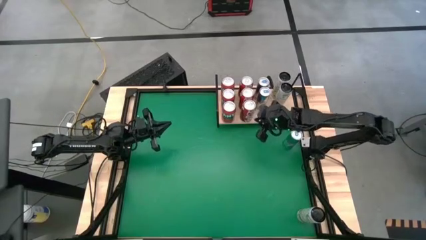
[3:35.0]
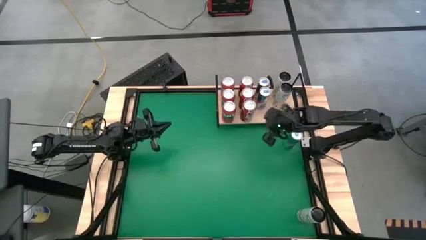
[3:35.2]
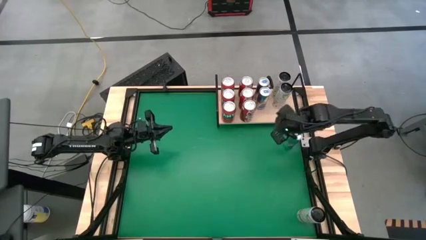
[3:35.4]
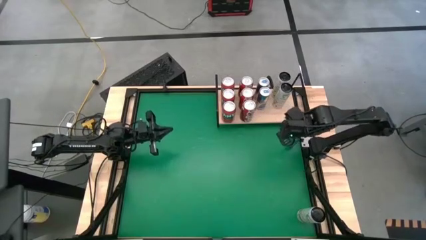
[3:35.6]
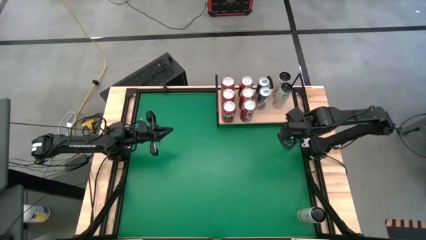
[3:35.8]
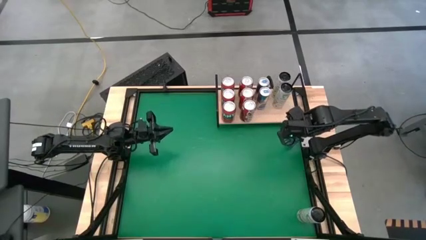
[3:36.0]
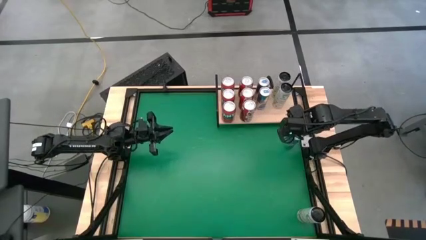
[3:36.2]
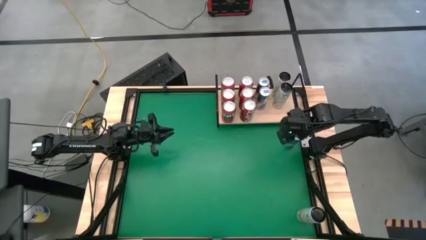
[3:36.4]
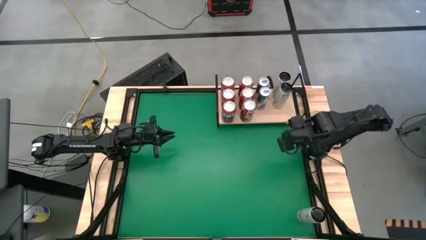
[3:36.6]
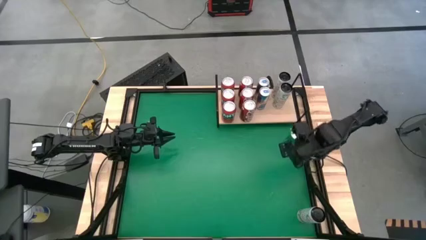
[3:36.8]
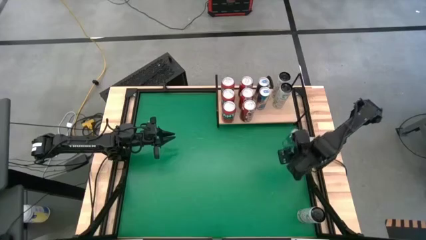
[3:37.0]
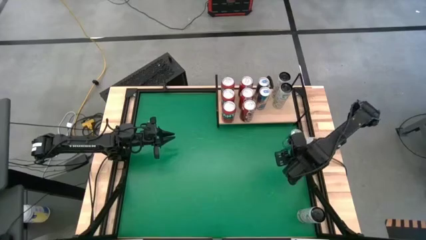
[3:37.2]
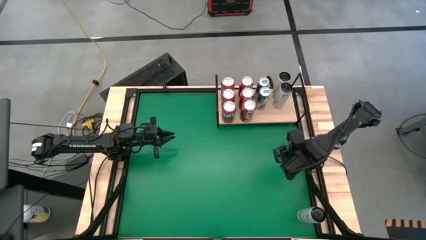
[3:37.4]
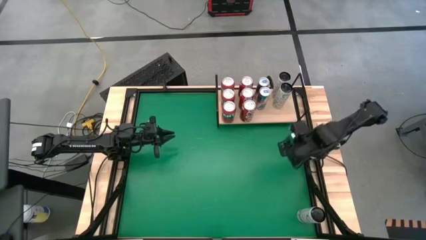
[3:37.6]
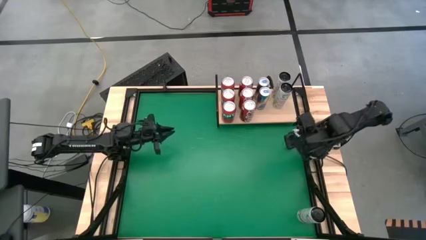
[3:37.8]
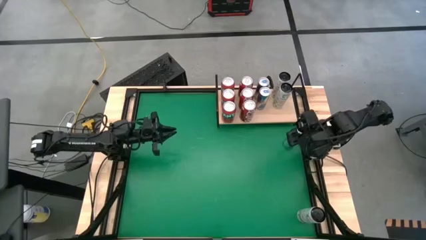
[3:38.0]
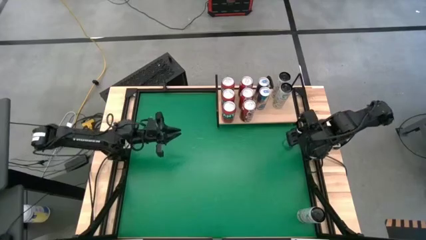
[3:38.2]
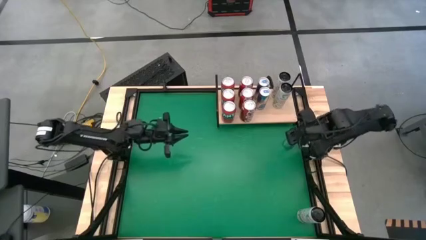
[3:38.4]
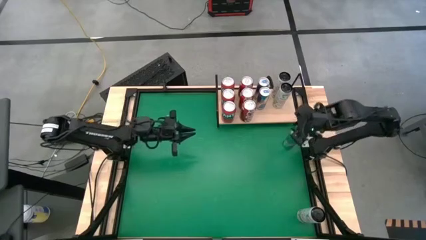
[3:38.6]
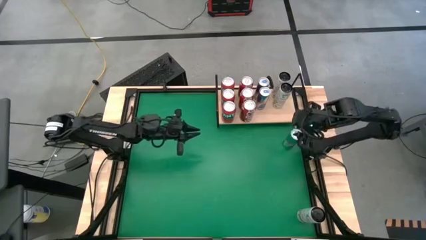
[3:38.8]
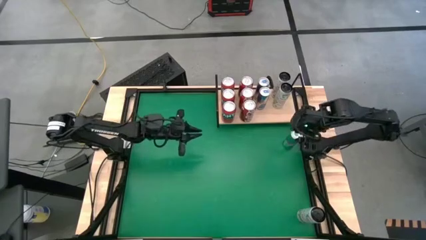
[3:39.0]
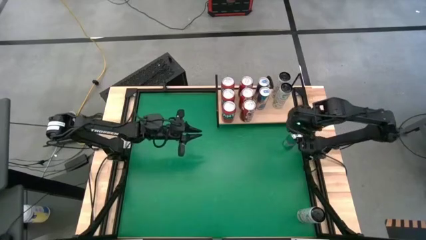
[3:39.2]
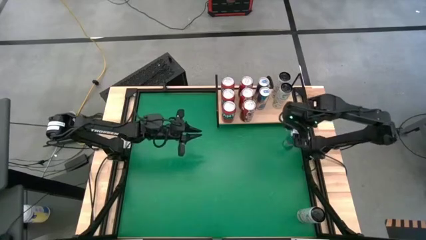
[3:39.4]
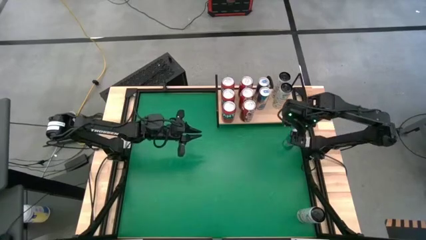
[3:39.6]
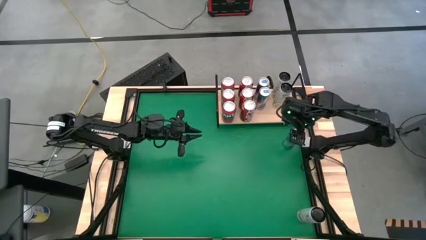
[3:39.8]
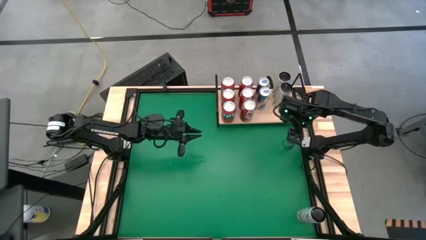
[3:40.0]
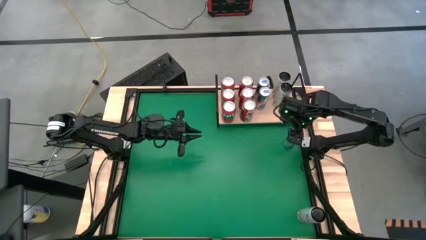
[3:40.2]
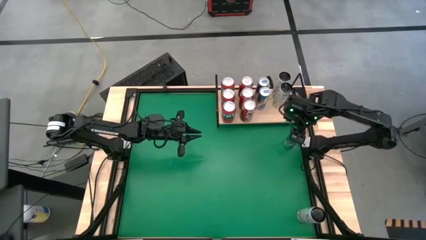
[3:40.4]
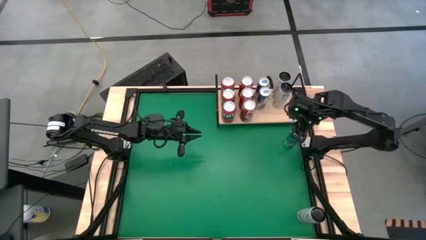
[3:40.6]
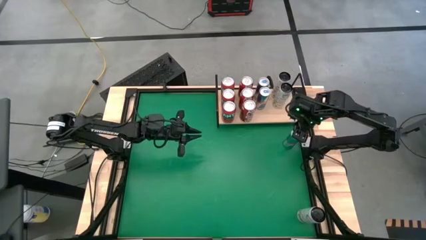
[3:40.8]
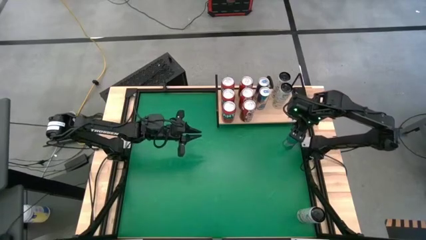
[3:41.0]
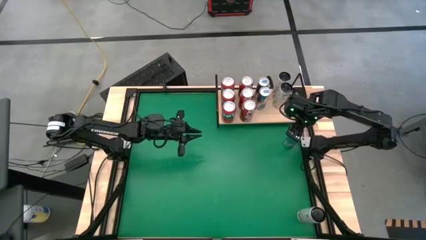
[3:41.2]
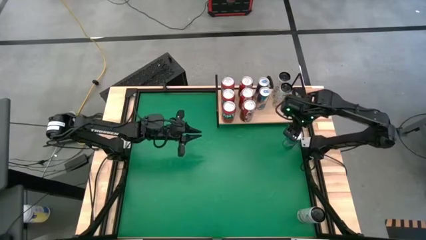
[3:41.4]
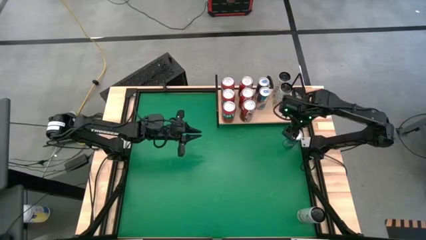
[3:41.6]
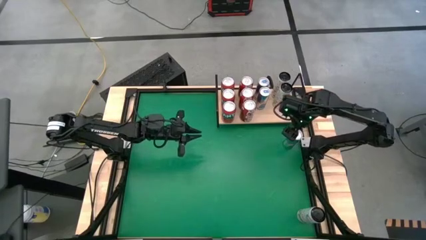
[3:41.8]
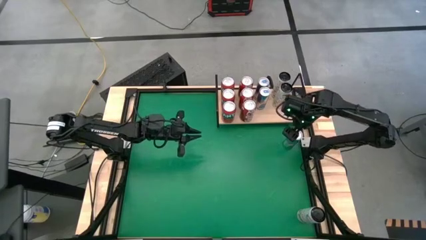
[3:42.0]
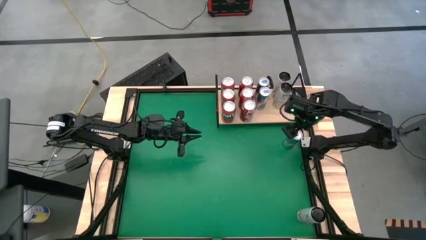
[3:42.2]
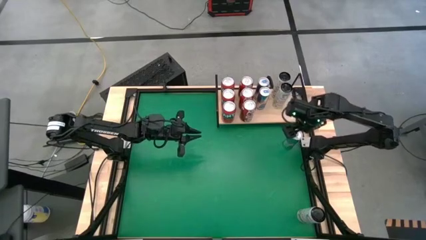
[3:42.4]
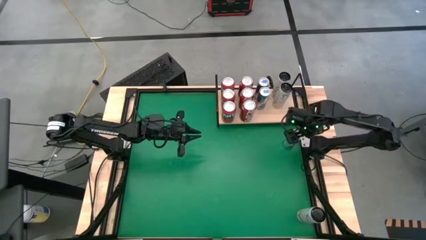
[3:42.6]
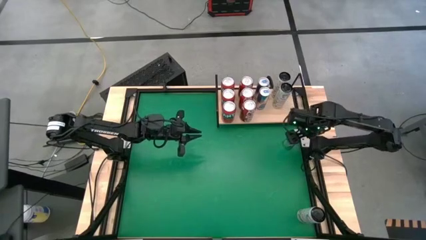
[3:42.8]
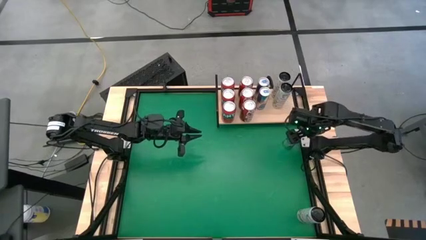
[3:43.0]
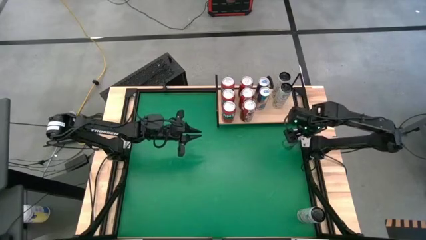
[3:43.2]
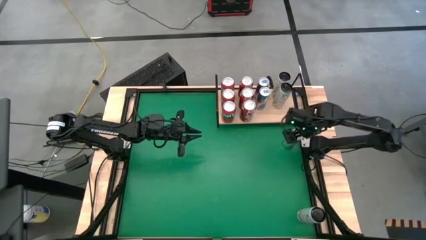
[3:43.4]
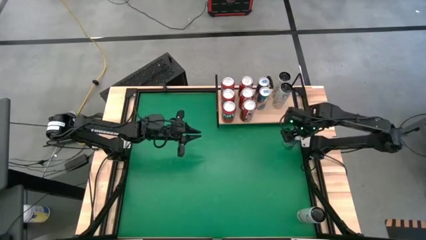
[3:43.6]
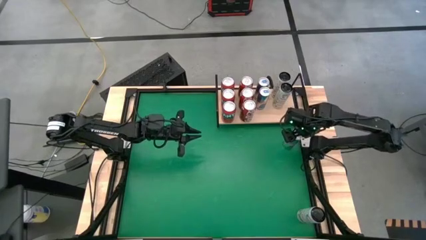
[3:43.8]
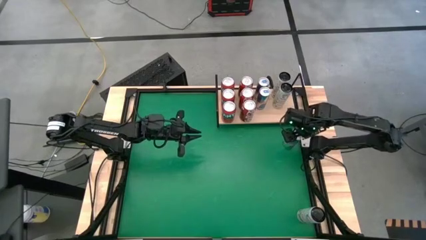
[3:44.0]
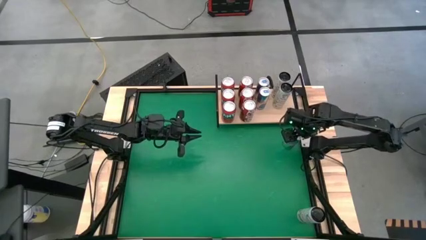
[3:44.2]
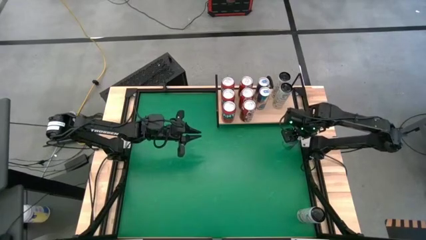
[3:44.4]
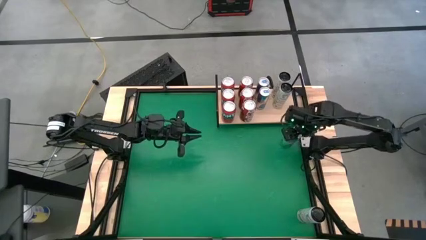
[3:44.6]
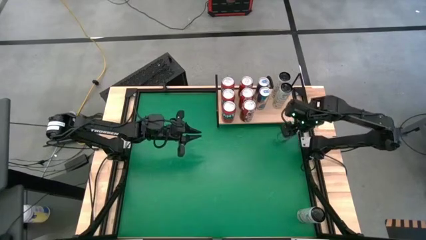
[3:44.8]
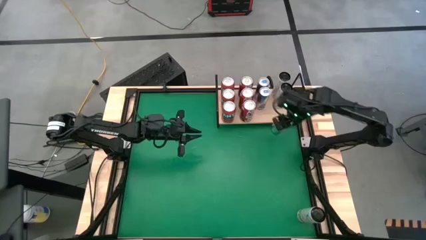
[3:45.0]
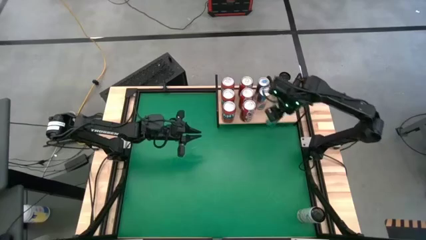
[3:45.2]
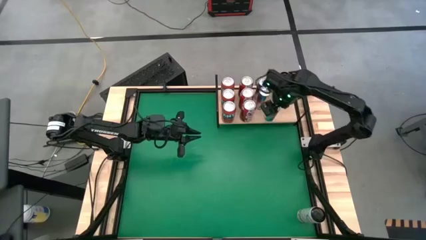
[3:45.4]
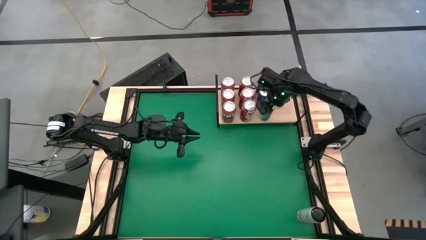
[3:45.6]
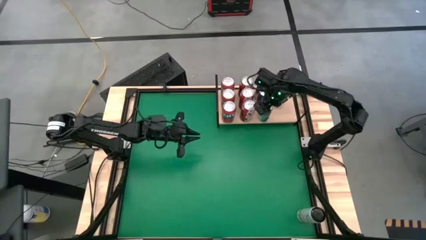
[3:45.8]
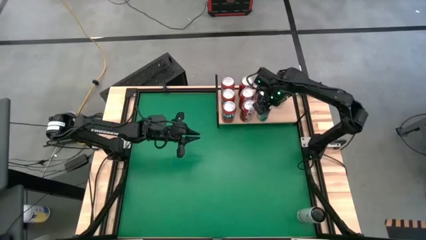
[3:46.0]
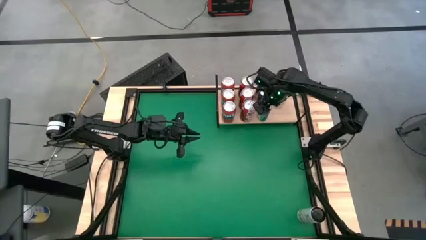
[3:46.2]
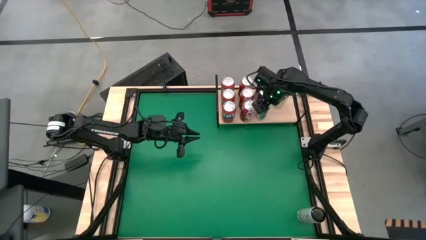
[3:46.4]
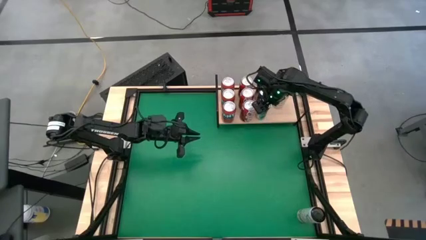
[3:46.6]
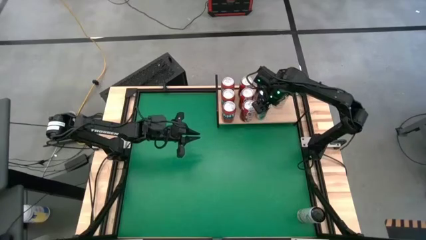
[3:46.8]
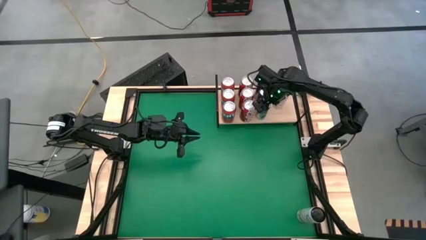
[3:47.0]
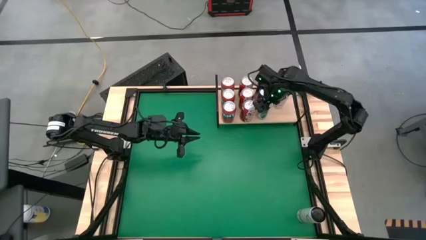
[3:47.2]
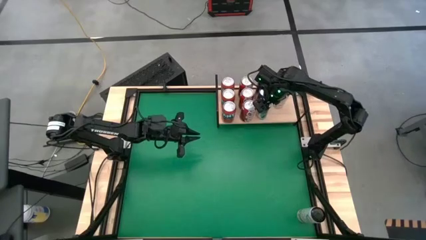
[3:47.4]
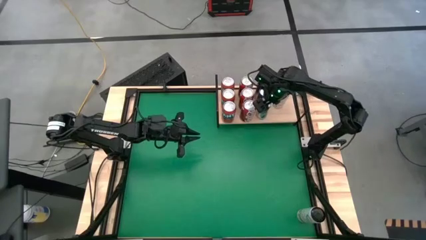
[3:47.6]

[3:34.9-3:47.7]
Task: Place canned beverage on shelf
Put the blue soda can on the shelf aligned with the other blue soda cans
